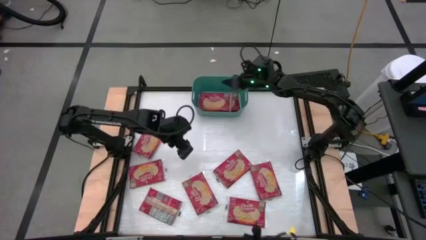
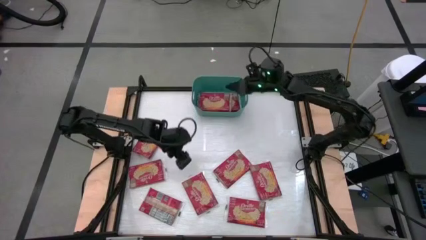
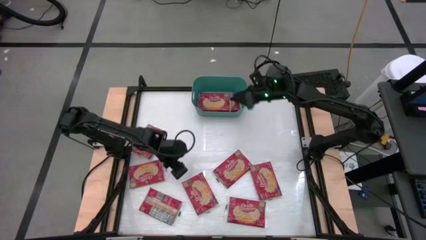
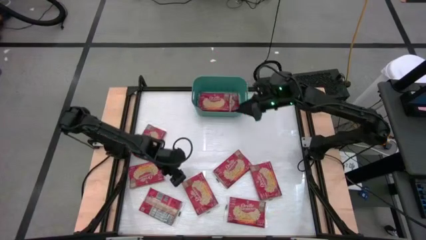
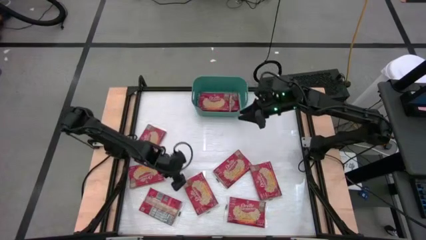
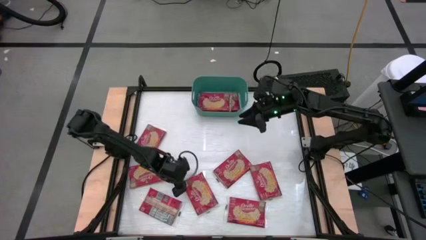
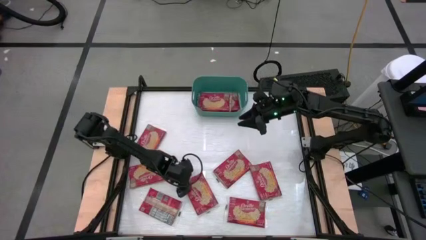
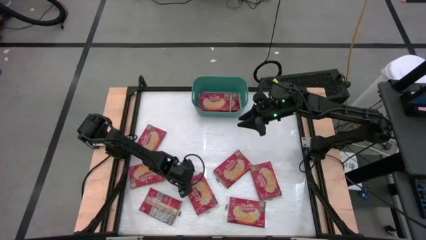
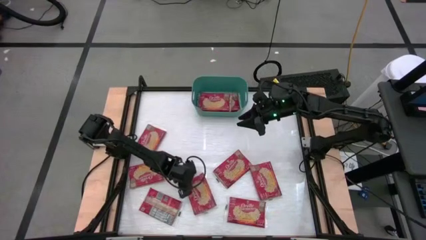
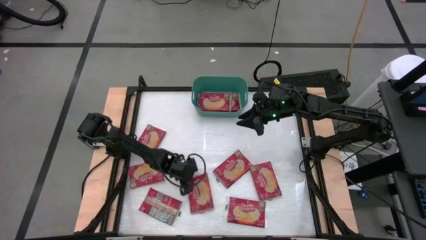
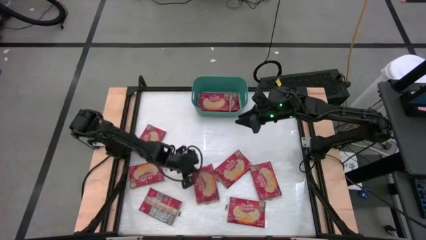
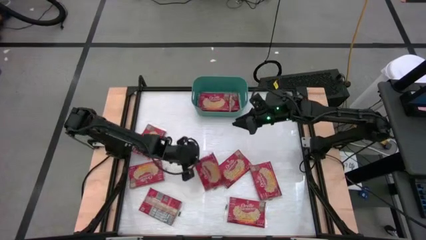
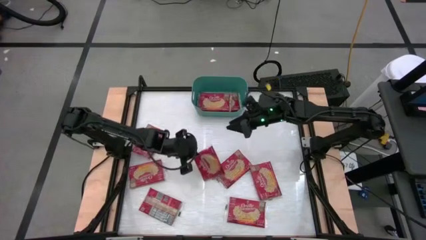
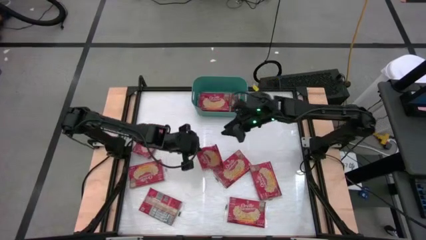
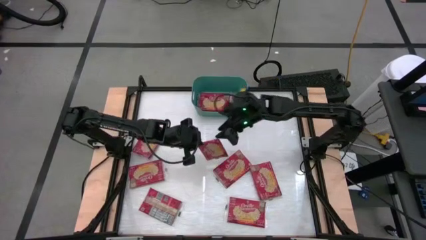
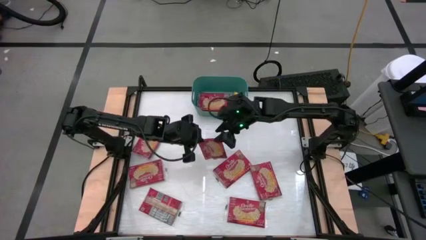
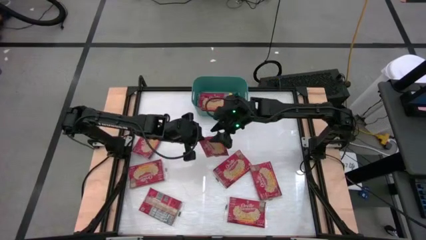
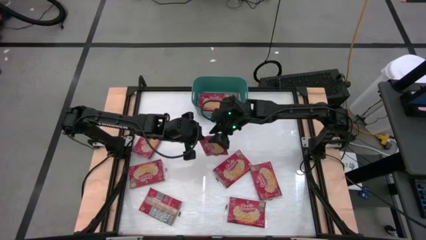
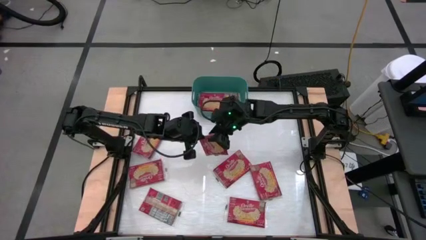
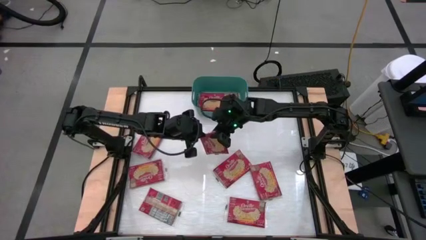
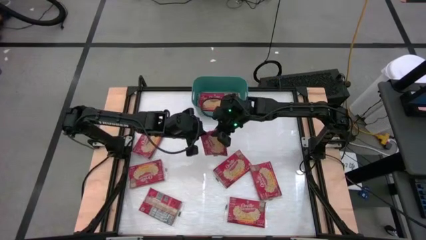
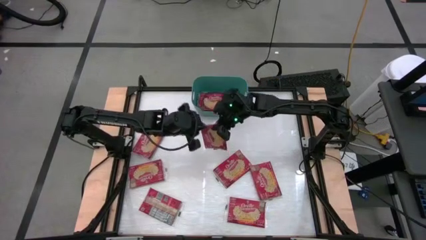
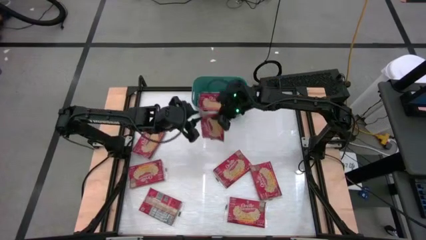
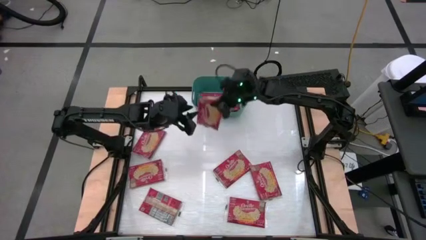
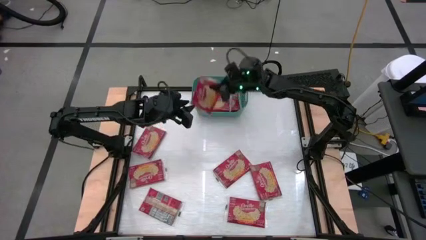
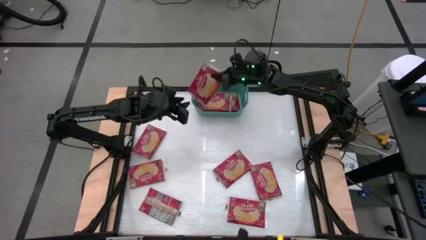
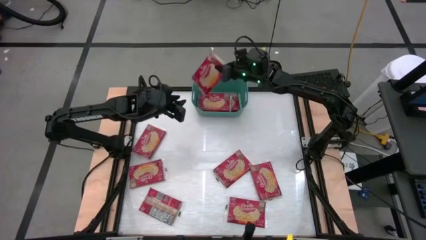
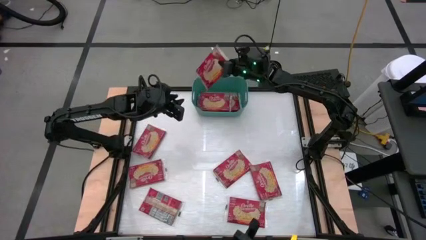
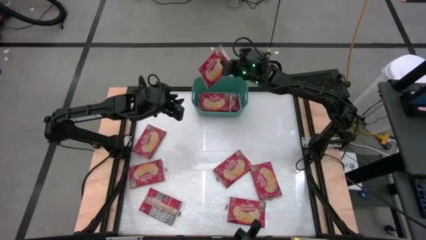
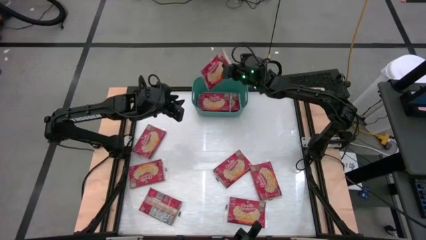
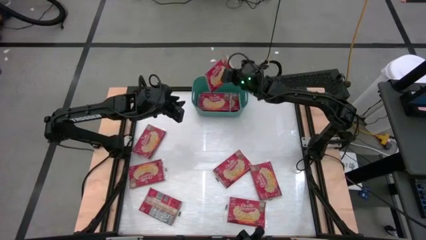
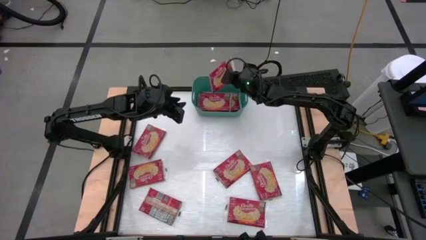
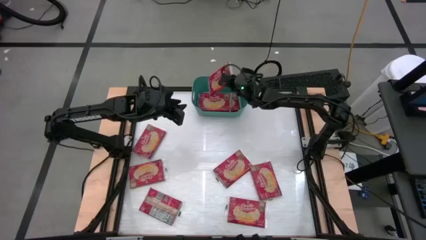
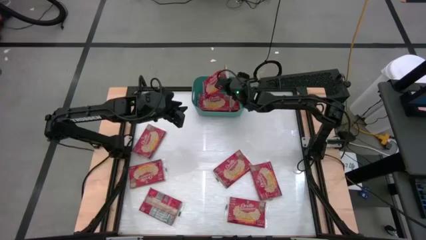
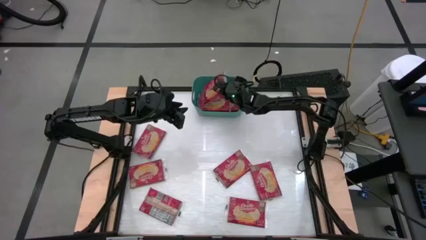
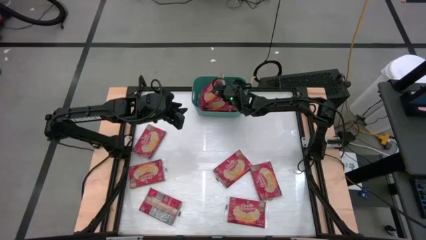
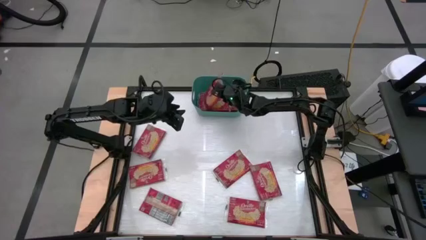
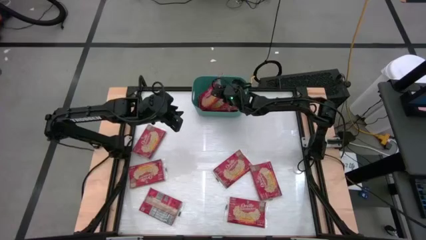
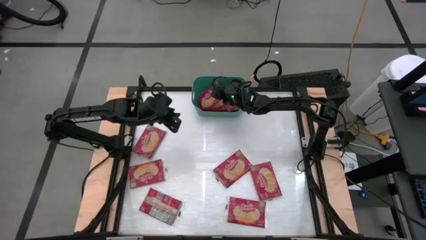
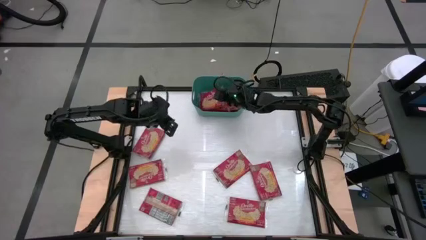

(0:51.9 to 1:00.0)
Task: Sort popcorn bags into baskets
Put the popcorn bag into the green bin

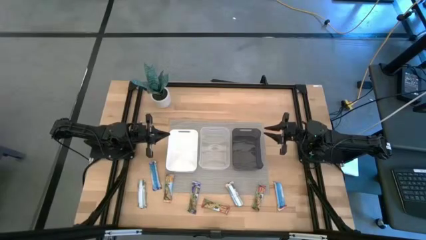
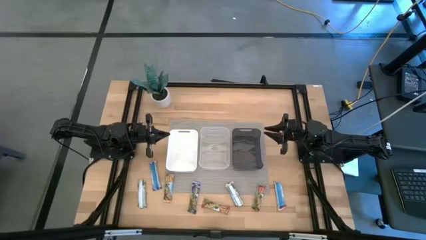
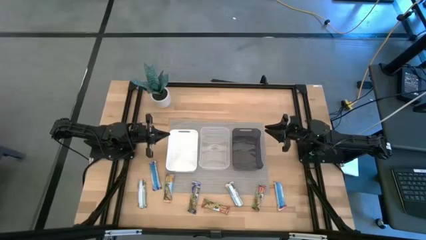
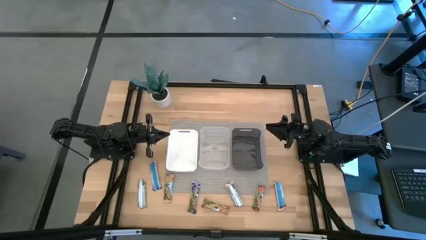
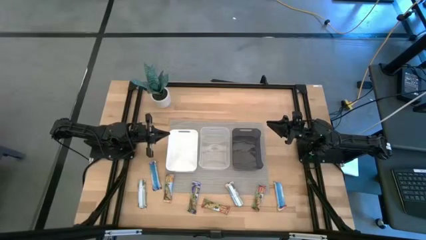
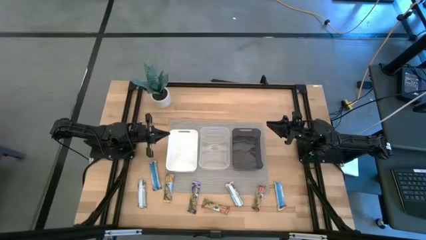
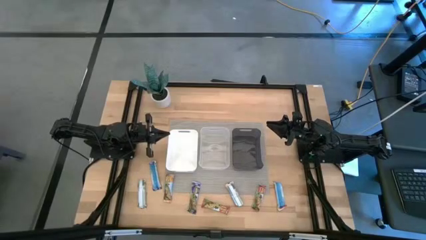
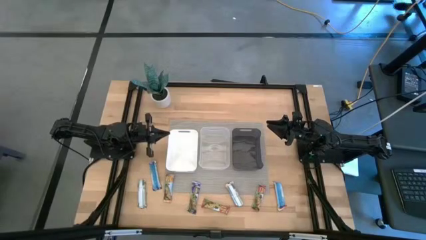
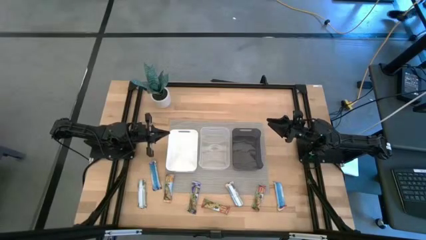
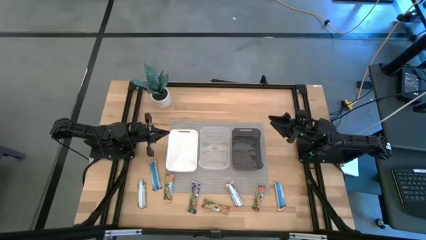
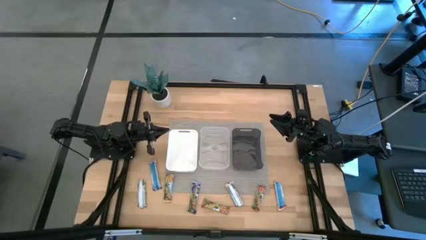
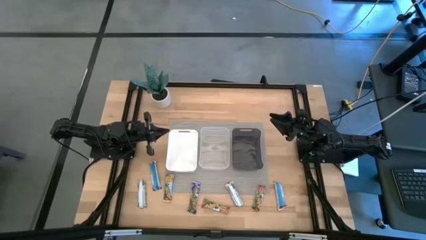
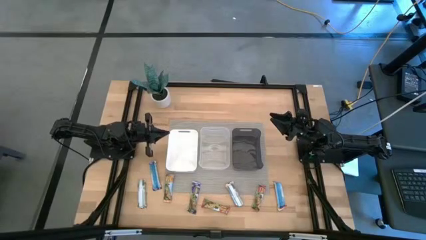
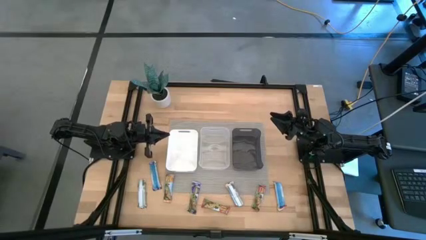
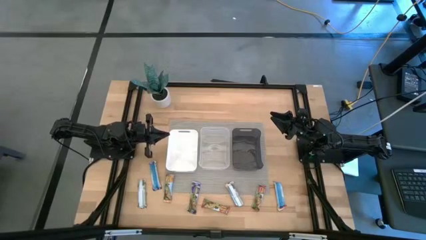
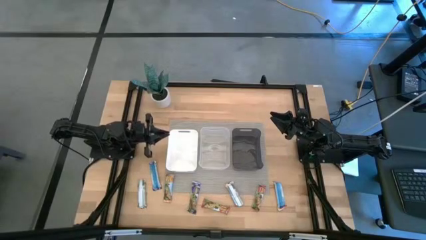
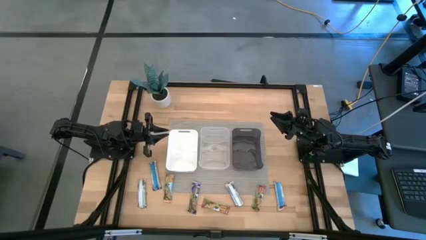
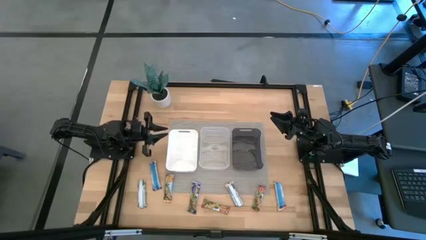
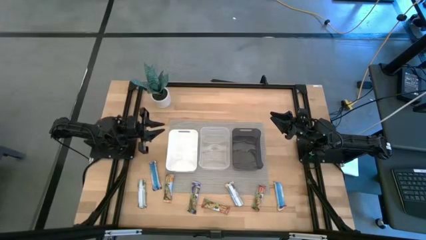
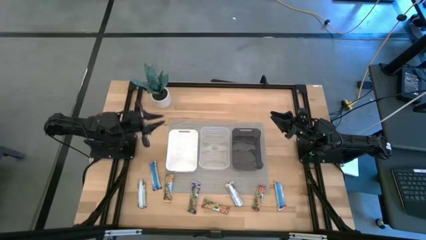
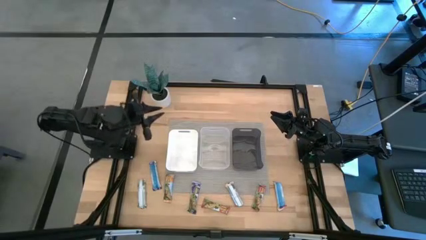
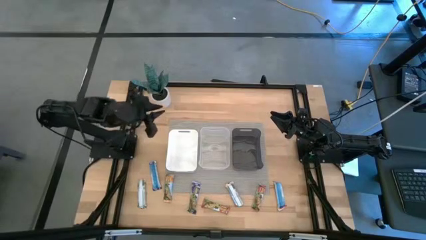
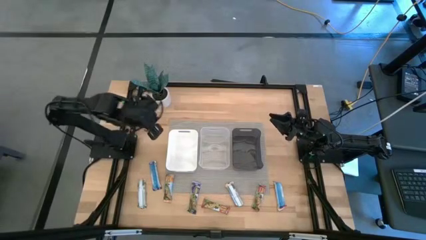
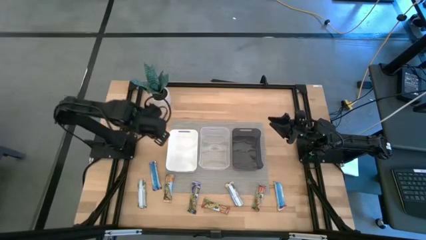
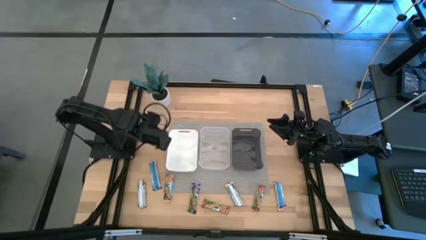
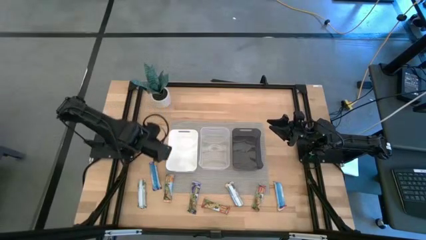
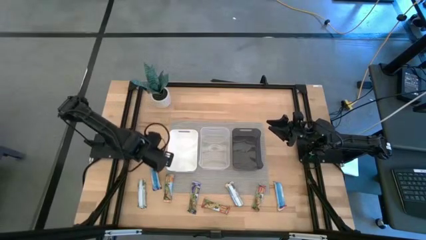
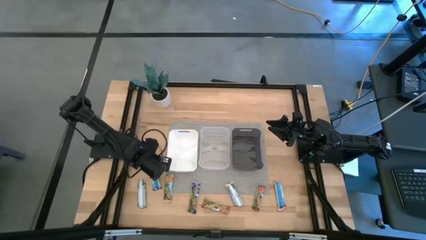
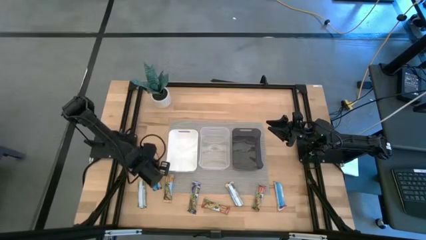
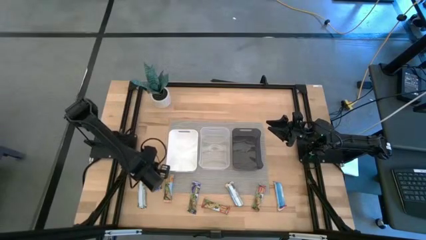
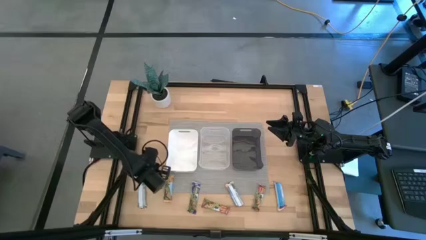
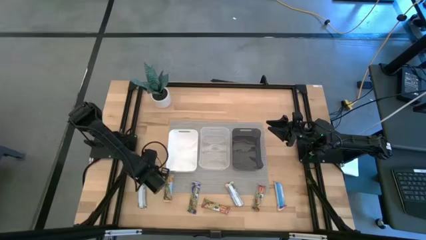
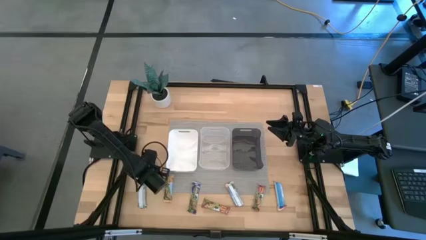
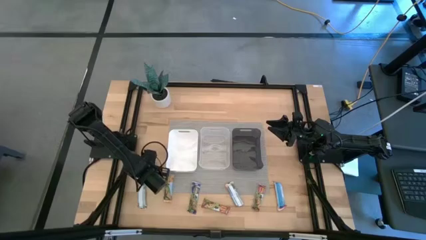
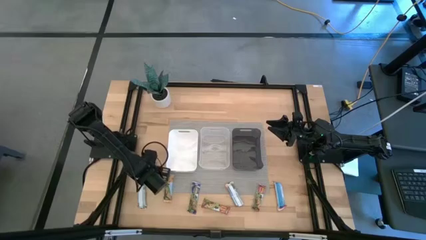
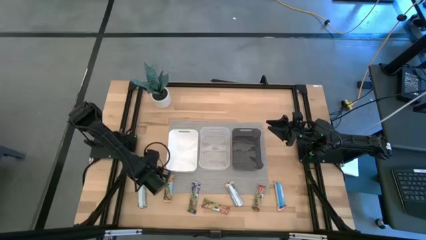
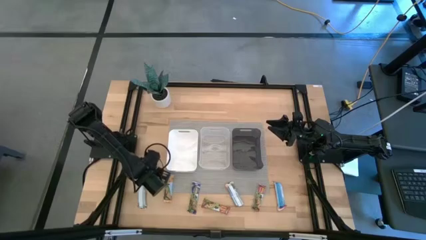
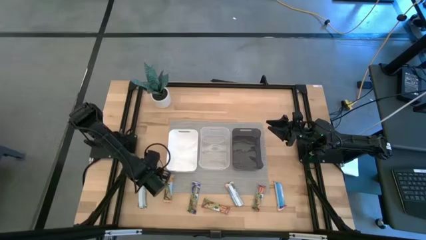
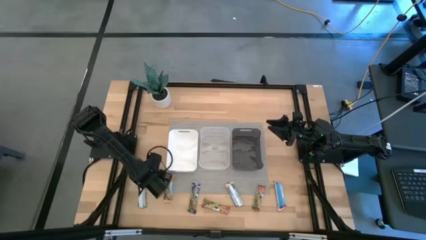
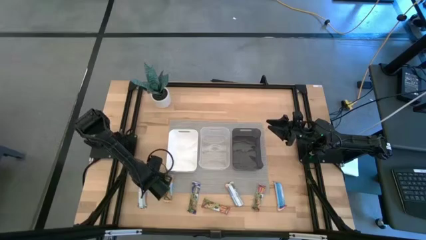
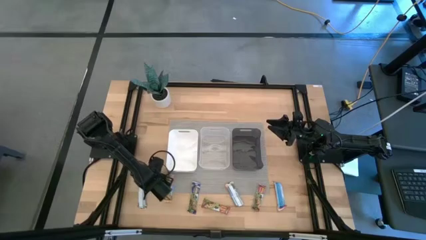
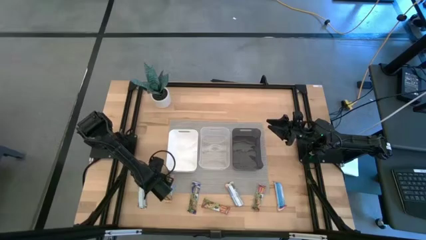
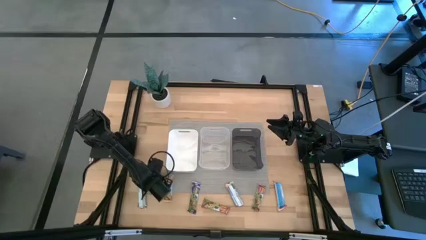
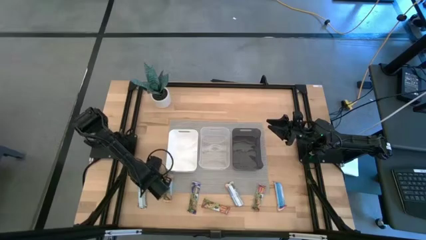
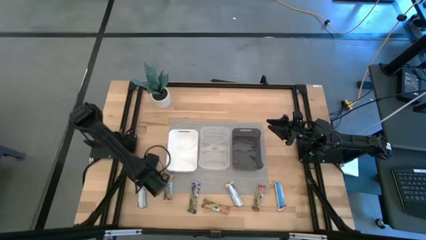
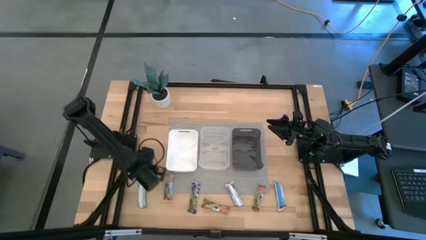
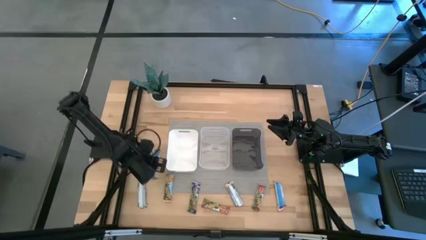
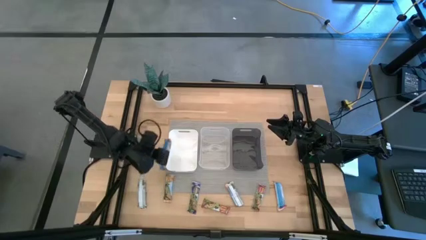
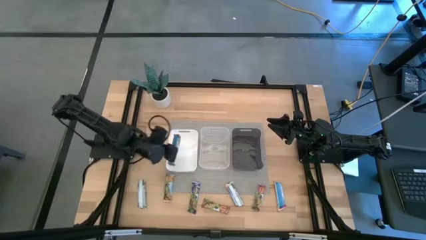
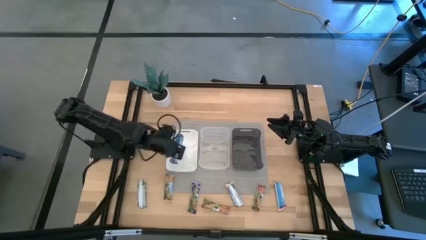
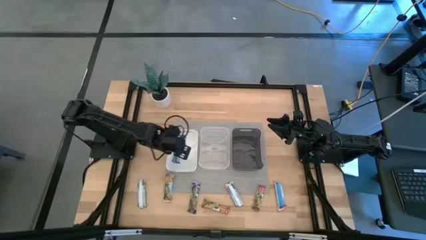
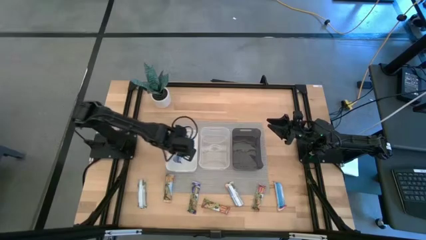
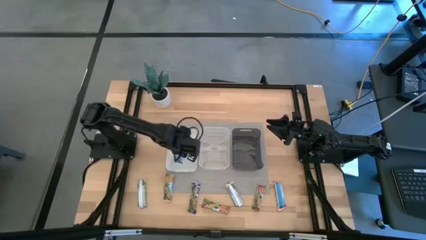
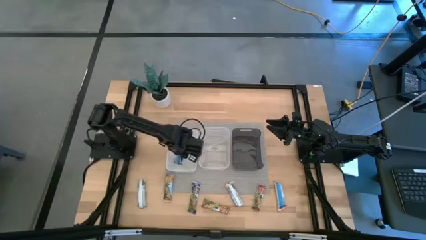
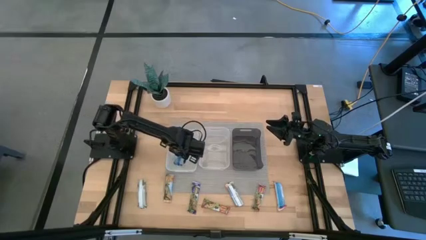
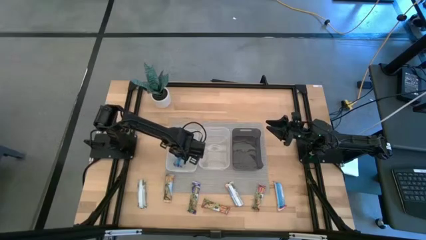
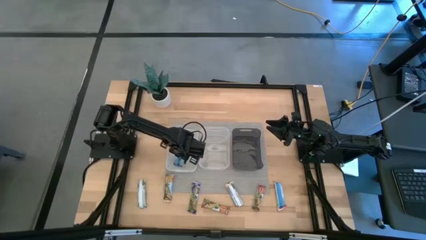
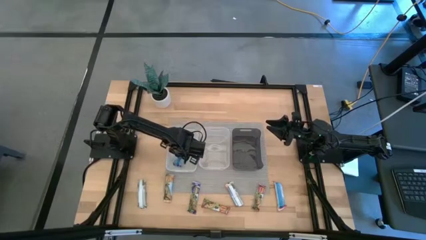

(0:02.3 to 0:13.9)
Task: Pick and place Granola Bars by type
Put the left purple granola bar into the white bin
